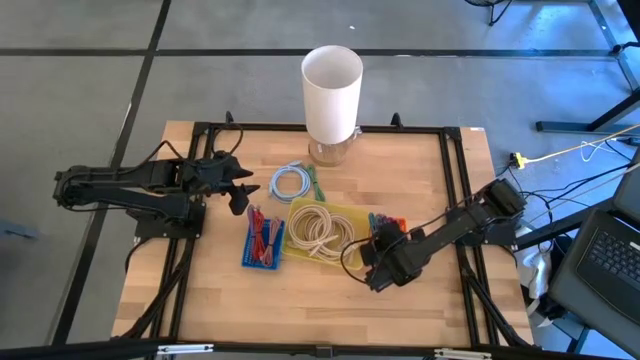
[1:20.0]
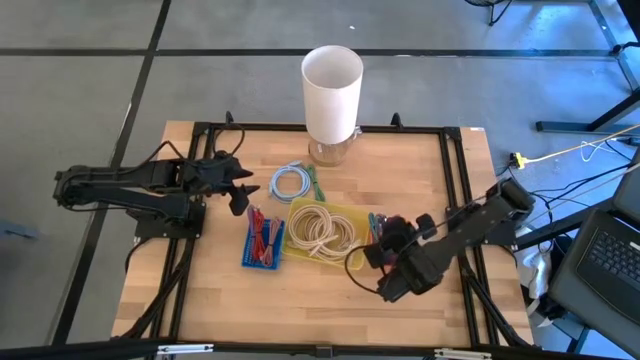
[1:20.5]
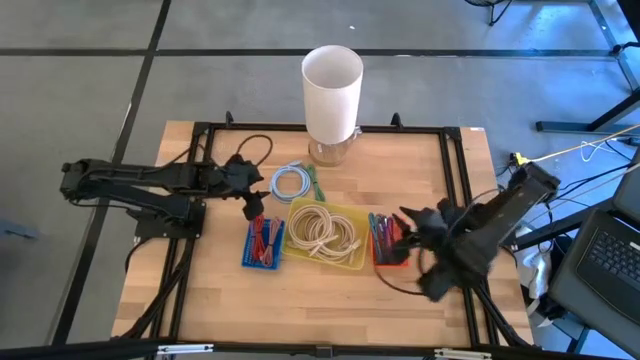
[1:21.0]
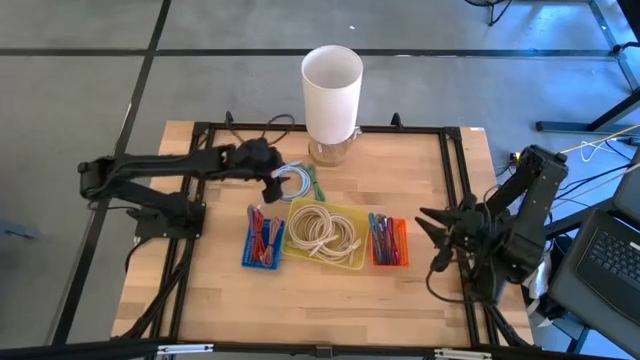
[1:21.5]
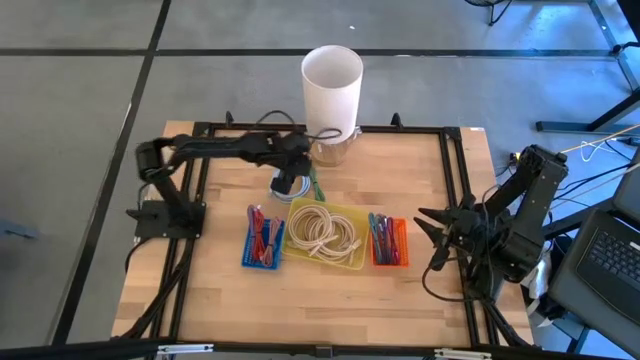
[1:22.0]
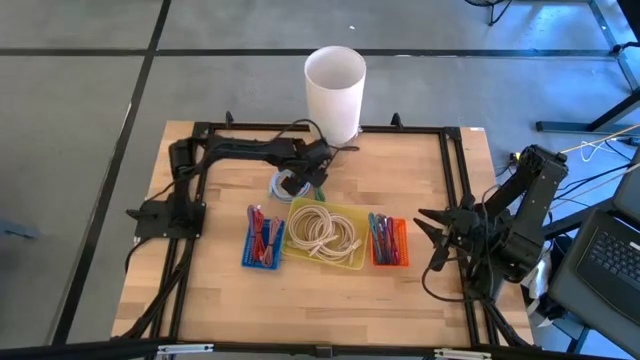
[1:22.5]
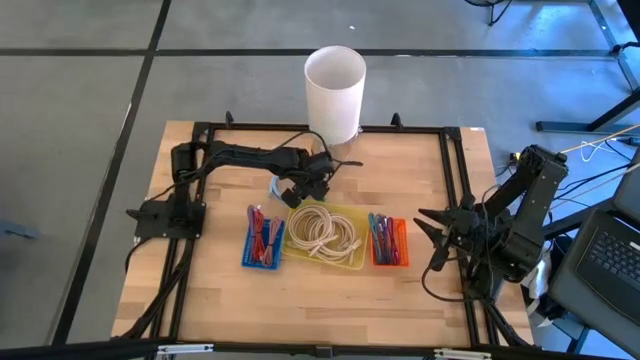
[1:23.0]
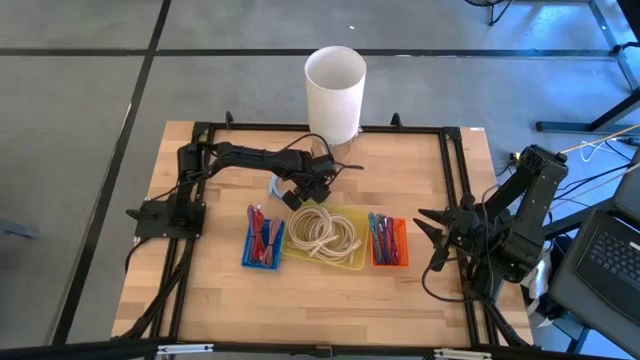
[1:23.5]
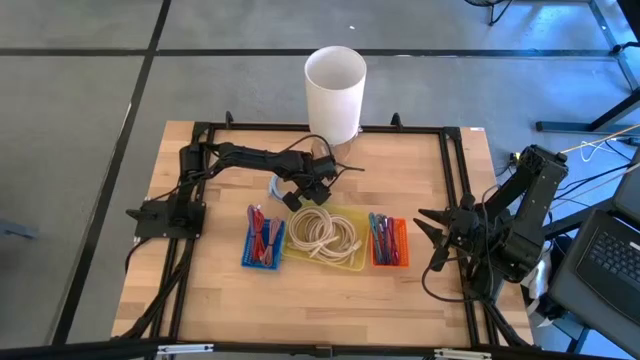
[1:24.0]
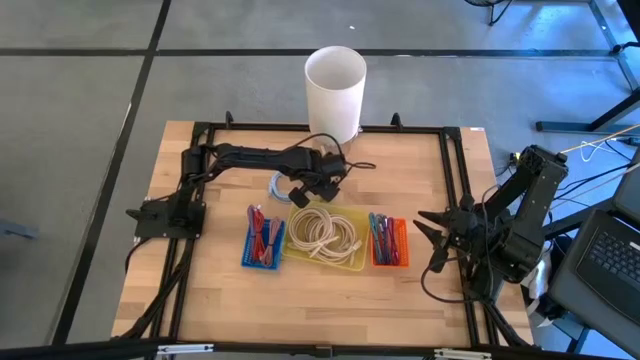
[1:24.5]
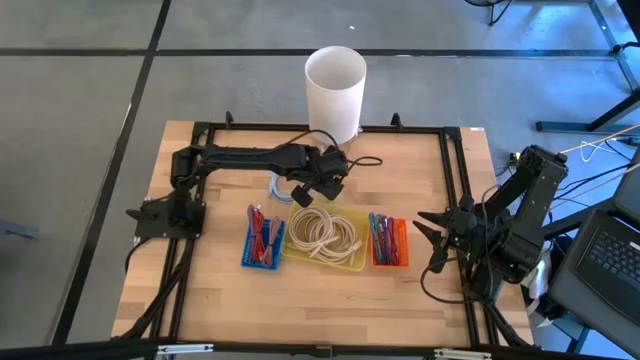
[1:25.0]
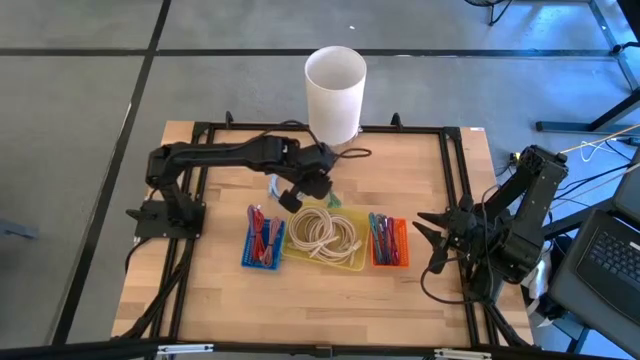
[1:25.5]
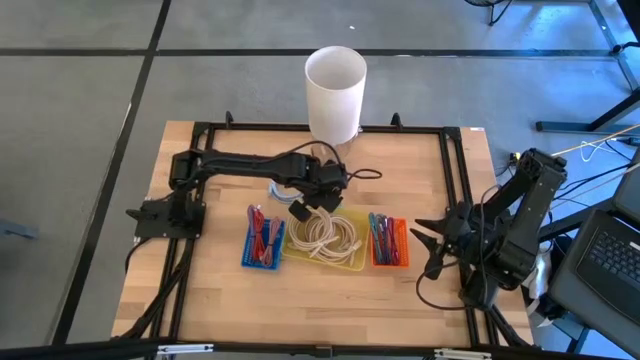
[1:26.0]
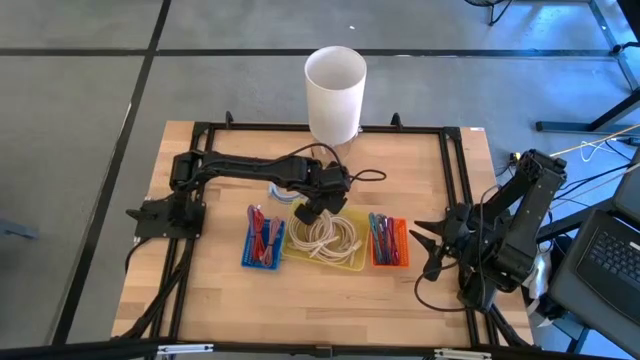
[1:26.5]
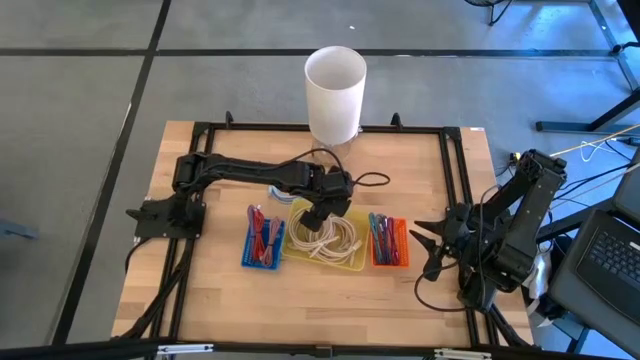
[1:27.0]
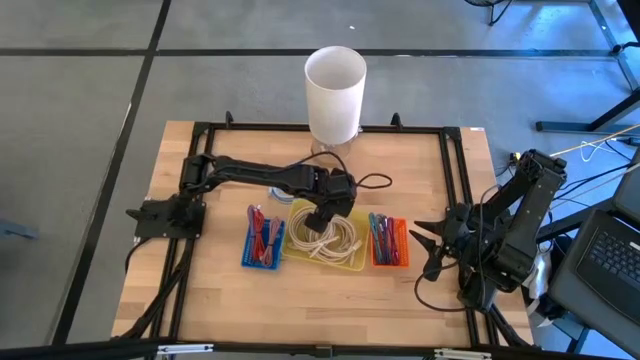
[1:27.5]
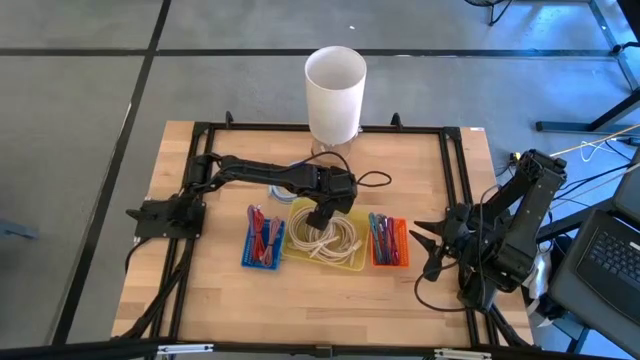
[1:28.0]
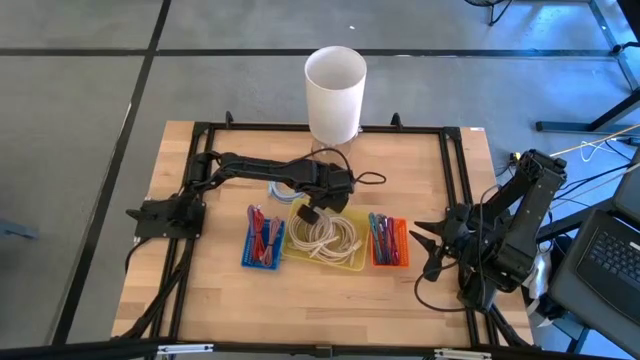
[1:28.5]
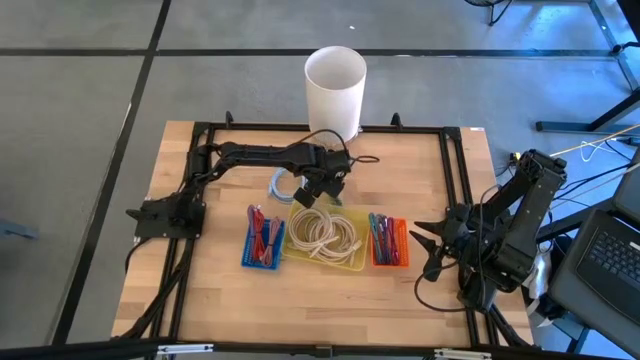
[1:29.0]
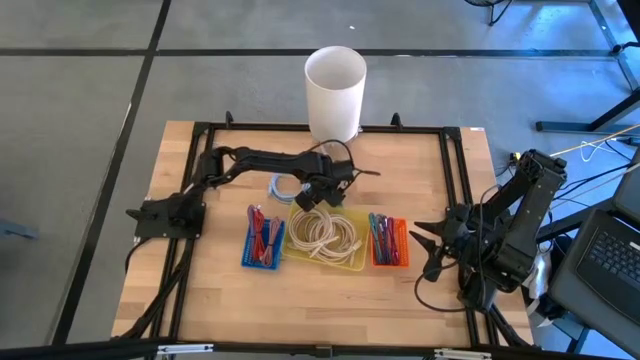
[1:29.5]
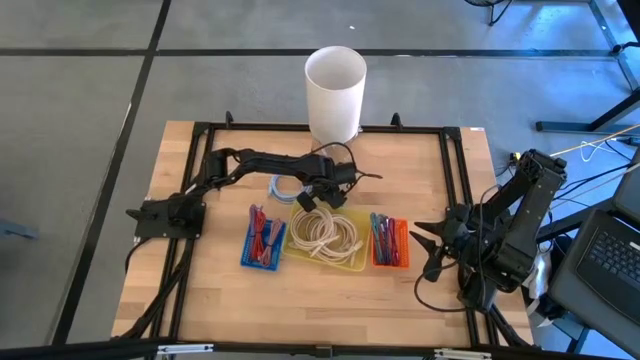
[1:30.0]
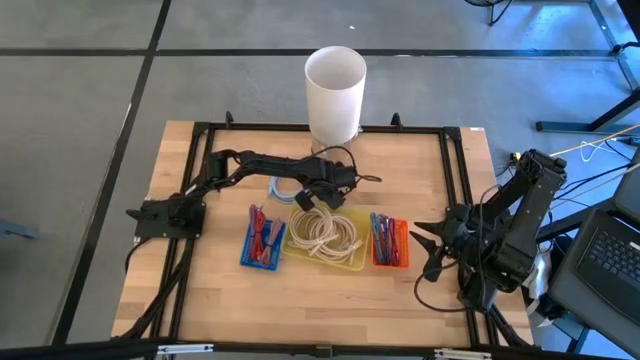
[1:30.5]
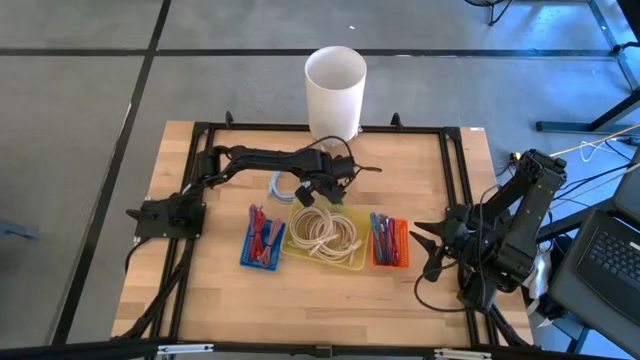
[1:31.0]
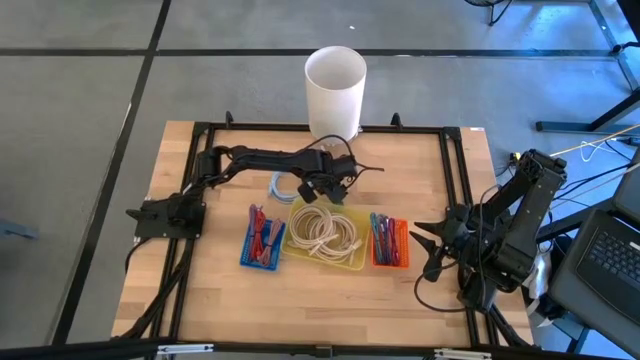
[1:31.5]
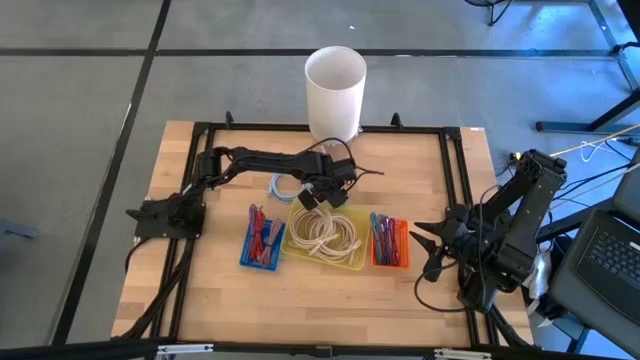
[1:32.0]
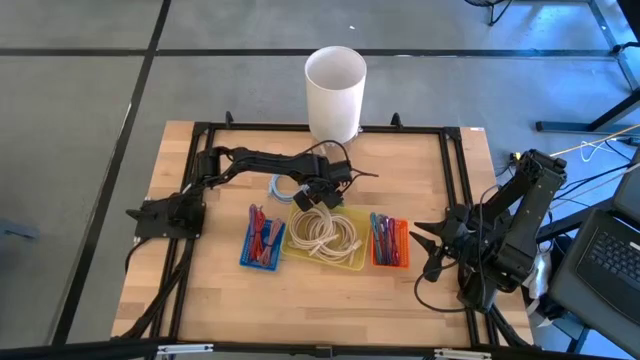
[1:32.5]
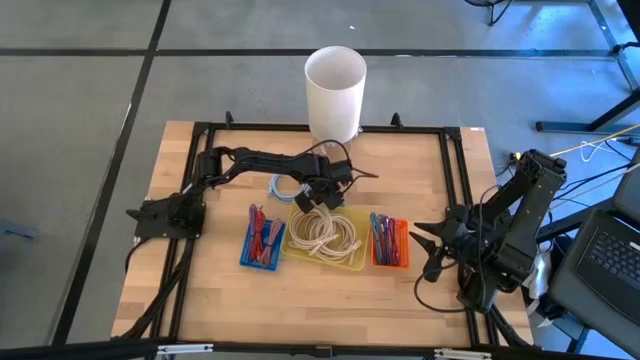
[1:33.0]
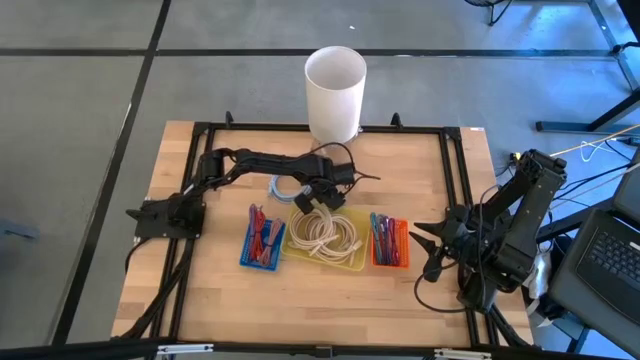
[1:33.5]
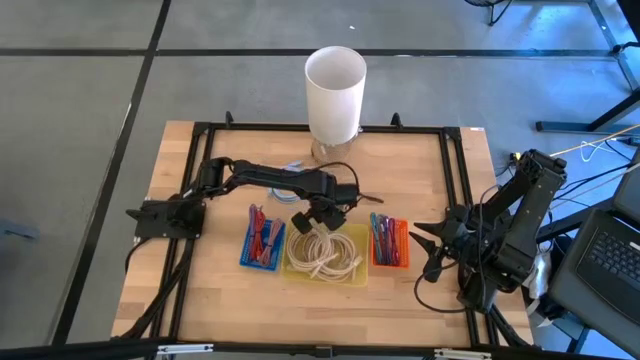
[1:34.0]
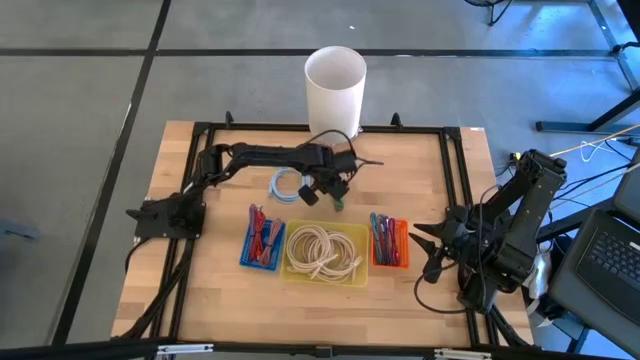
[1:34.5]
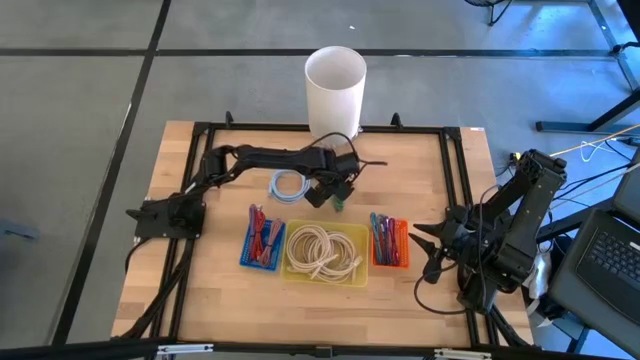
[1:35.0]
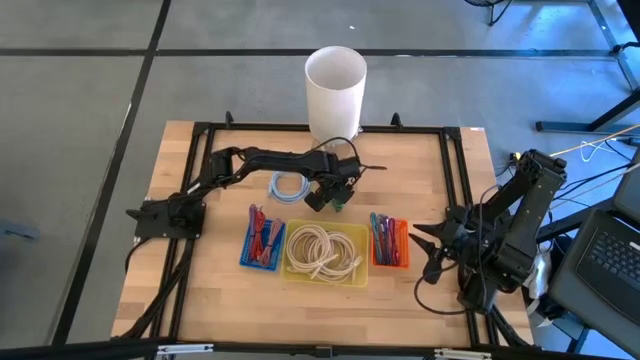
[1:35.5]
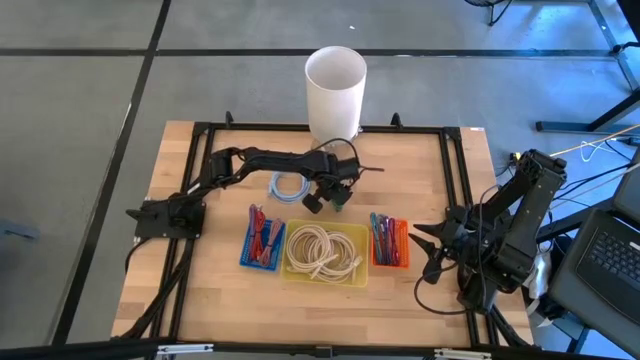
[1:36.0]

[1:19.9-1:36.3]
Task: Pick & Place USB Port
Put the green charger cable into the blue bin

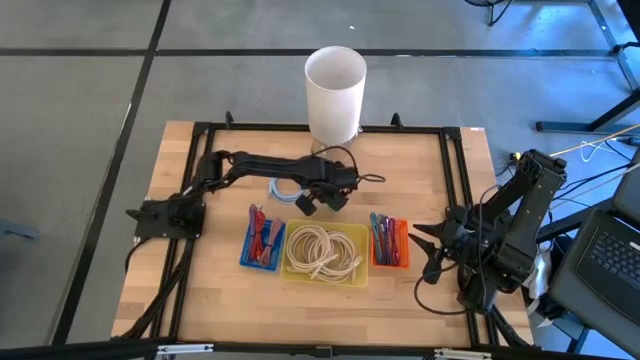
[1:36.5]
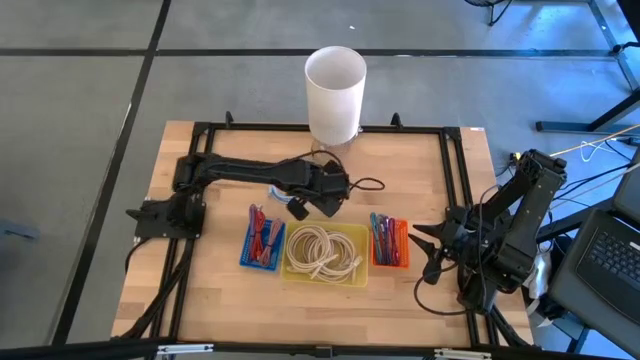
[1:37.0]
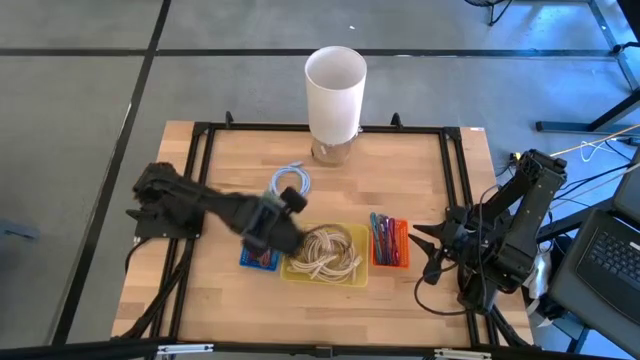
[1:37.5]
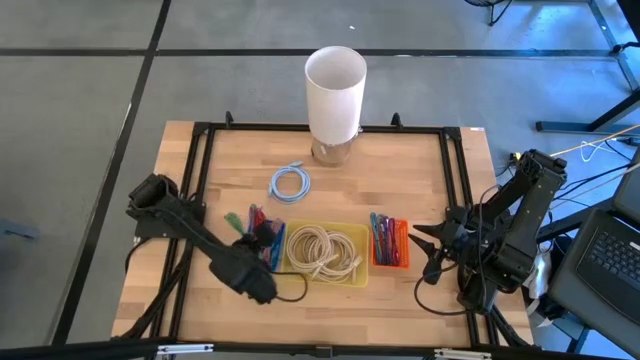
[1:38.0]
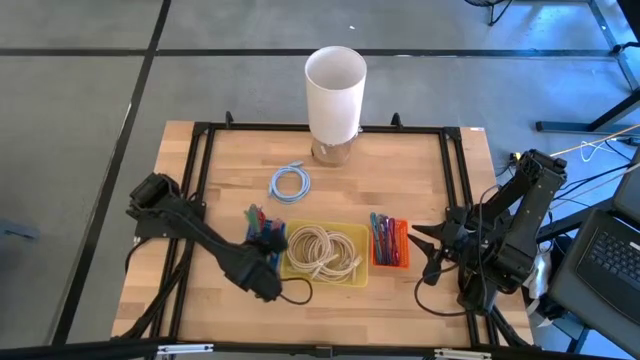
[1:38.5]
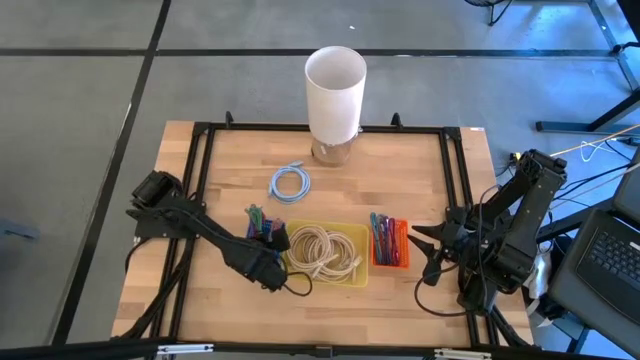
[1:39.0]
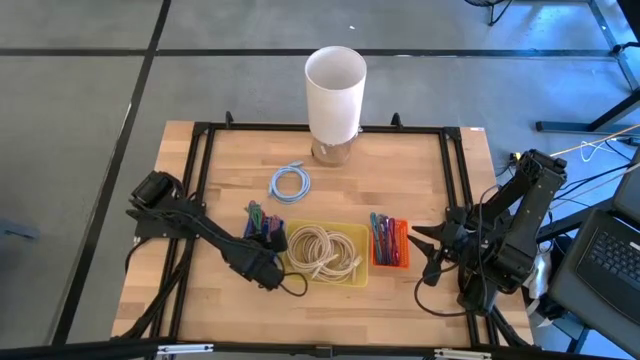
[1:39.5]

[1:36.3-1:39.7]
Put the green charger cable into the blue bin
